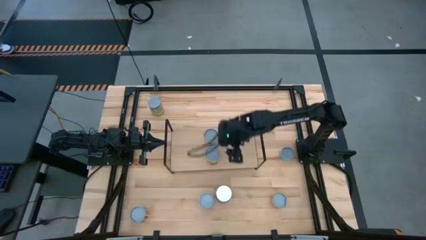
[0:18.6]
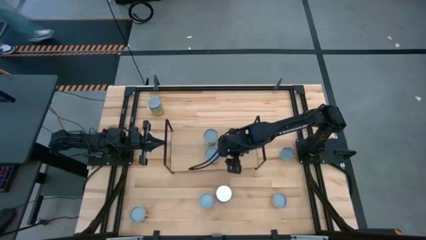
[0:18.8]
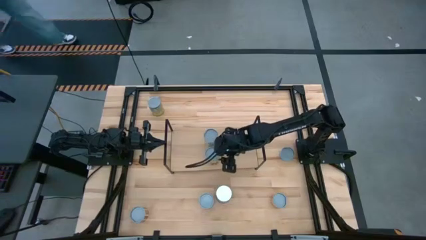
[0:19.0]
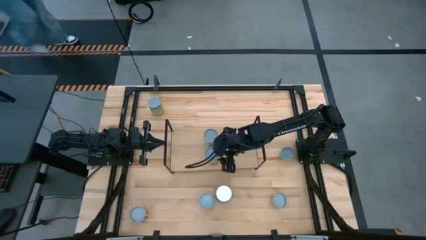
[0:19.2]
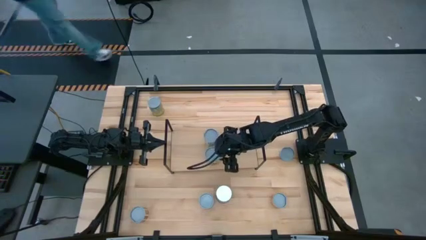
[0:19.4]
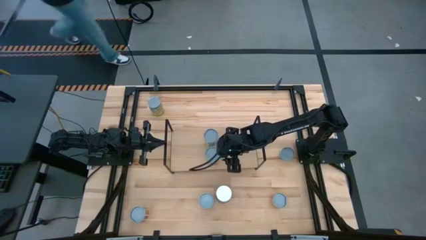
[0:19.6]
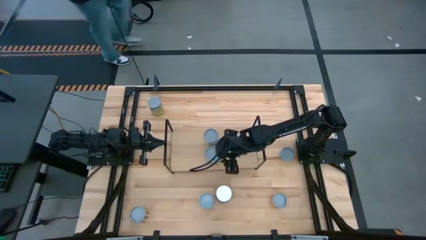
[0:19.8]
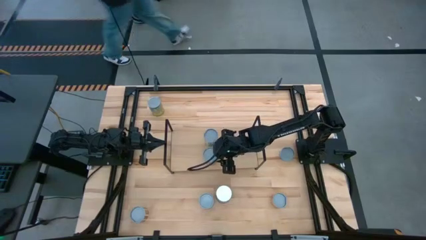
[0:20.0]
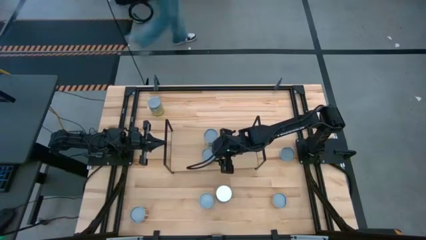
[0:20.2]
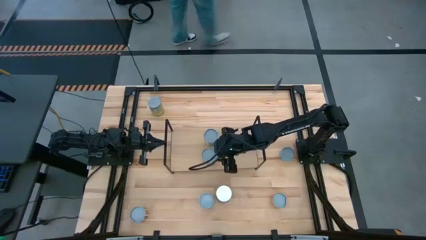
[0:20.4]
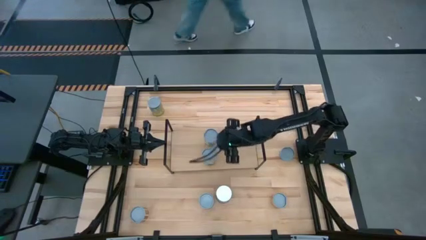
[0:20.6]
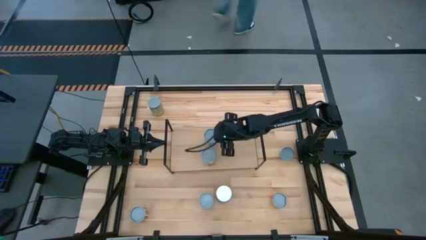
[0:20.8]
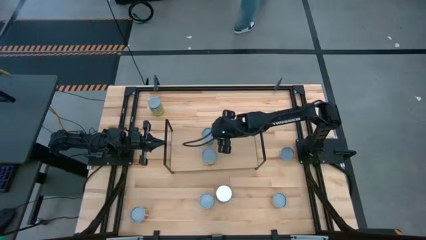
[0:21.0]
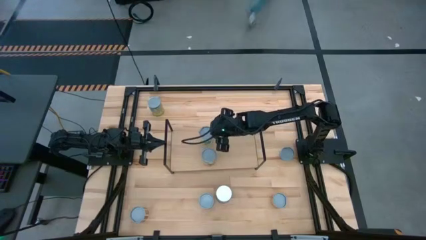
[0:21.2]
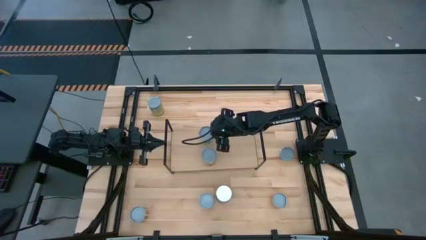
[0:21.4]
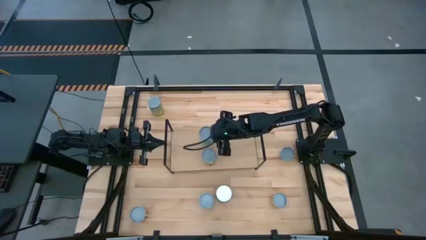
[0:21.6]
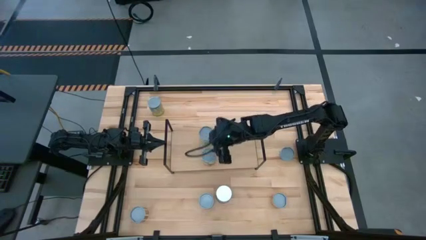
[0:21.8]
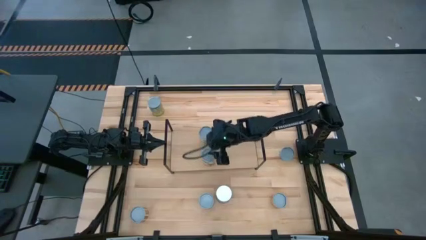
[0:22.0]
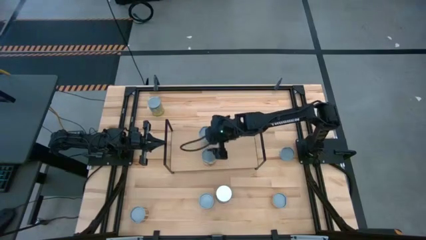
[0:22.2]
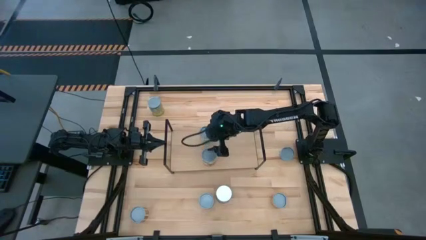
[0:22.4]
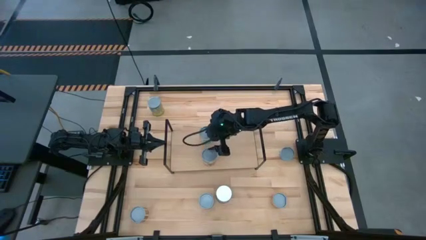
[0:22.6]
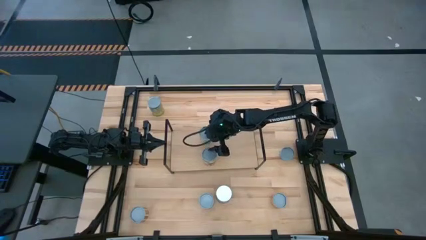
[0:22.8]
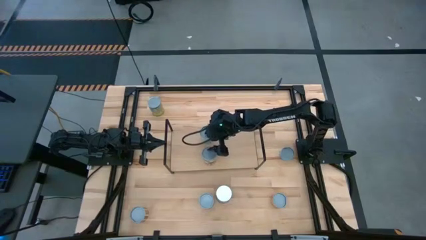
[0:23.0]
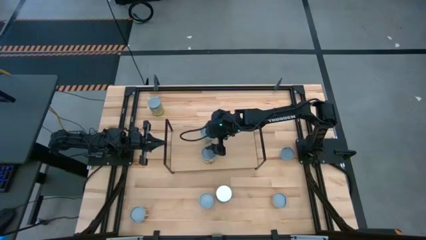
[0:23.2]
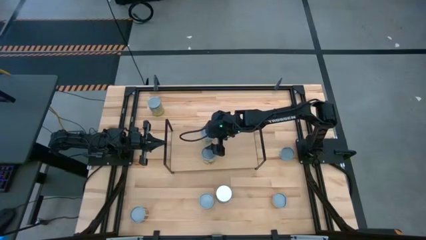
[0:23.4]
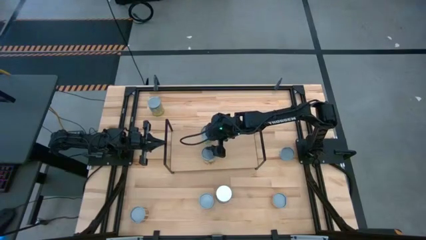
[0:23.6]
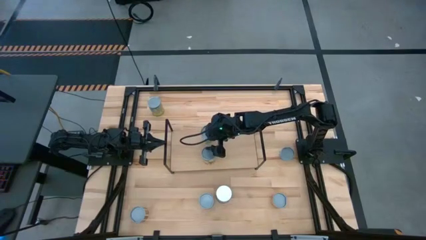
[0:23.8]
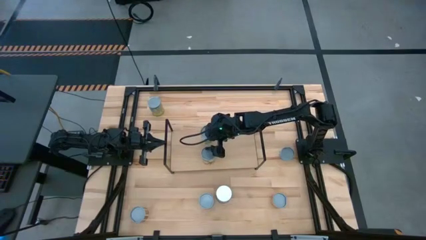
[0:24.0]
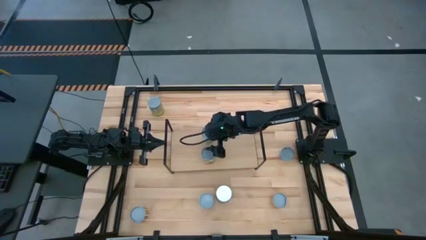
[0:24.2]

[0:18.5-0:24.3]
Task: Pick and place cans onto a shelf
Adjust the canned goods on the shelf

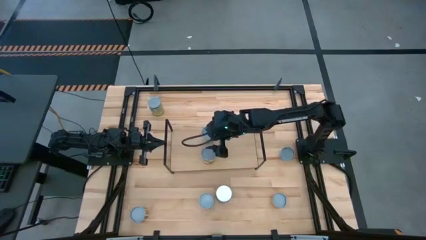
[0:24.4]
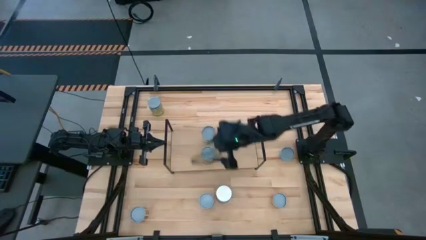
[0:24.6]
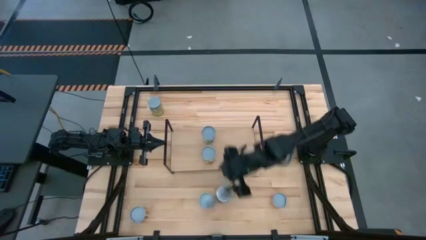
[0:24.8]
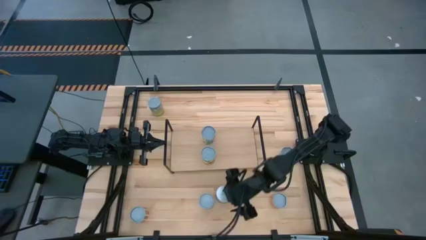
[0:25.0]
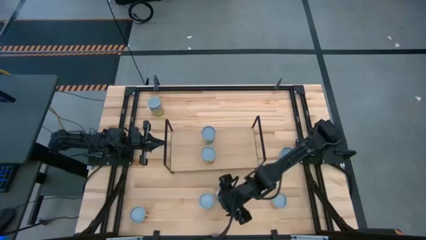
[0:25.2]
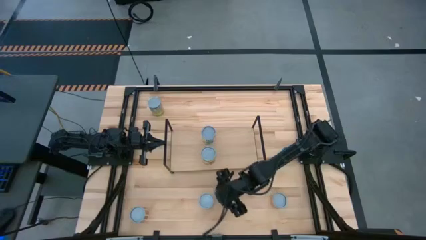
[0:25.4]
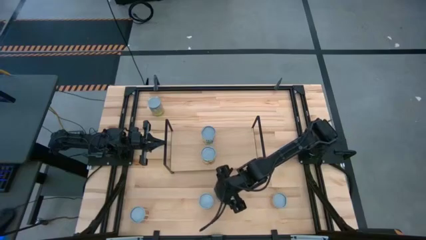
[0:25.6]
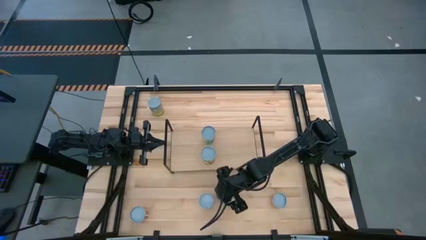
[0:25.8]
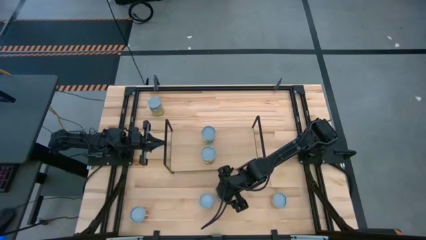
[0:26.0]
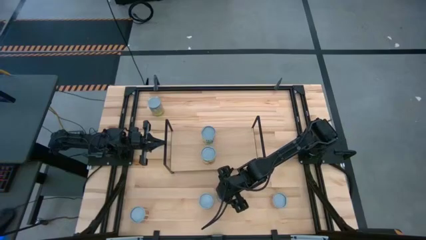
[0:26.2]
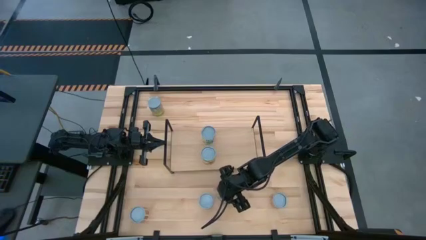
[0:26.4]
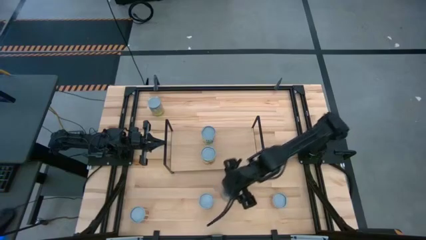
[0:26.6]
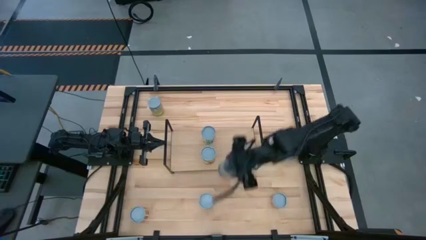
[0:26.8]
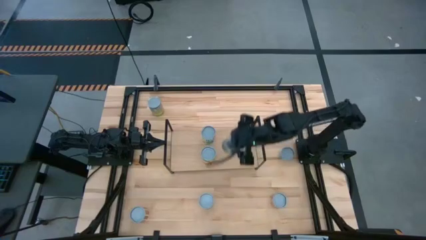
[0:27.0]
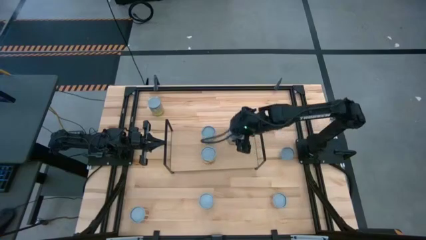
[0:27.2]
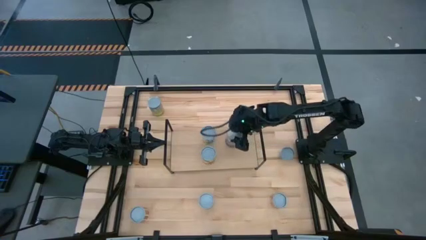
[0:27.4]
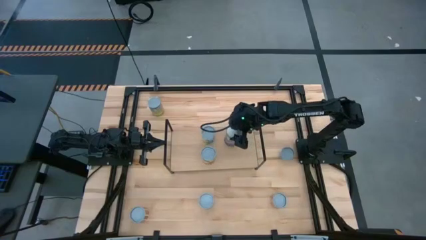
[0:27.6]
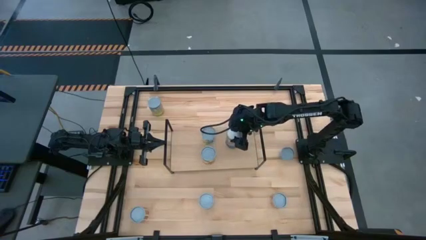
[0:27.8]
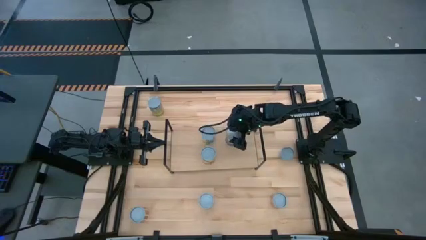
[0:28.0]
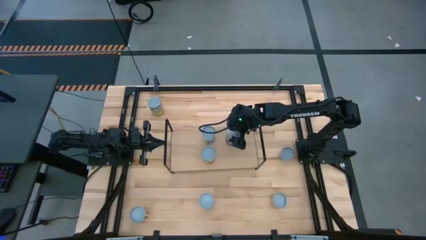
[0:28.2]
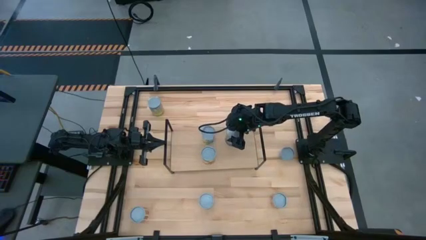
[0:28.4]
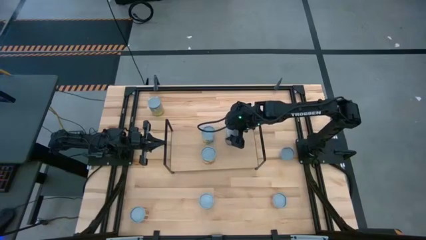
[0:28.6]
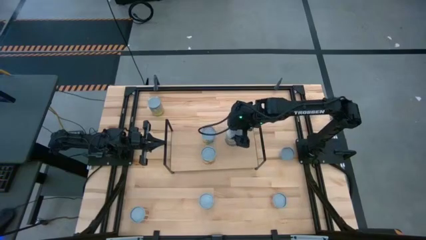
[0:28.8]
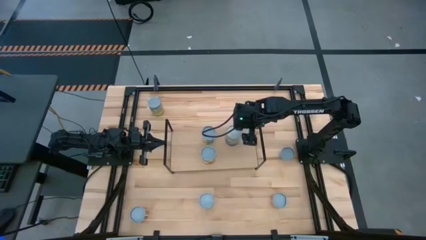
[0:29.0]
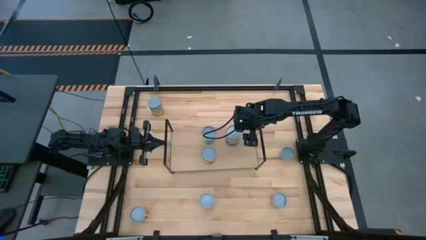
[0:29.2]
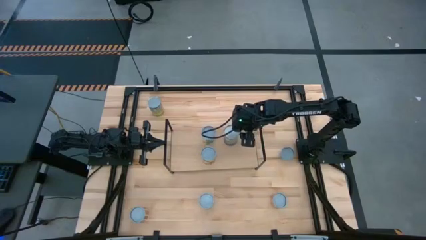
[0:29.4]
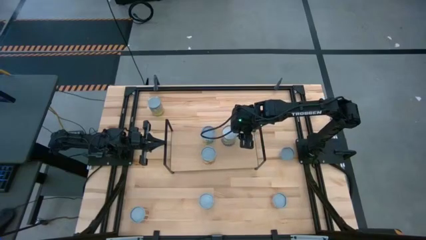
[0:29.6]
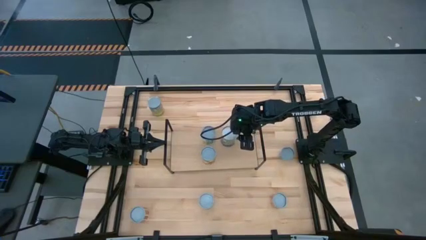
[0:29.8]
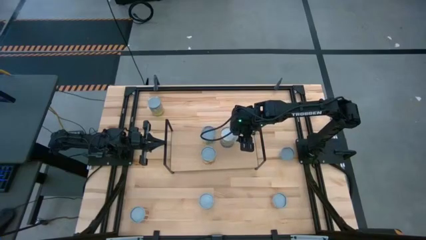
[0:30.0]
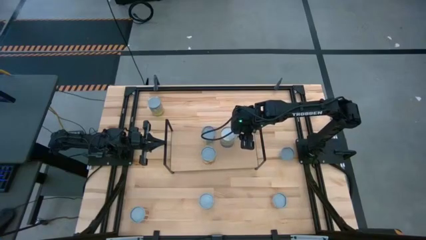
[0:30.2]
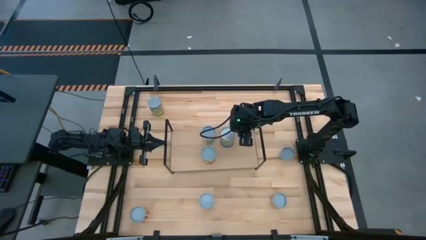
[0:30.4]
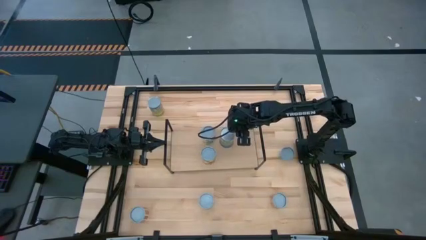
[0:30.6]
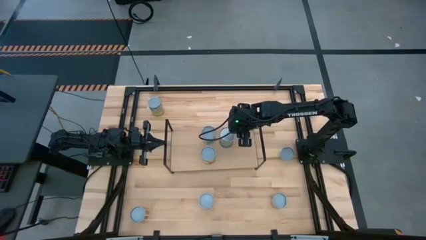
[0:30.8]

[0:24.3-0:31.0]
Put the canned peas on the shelf

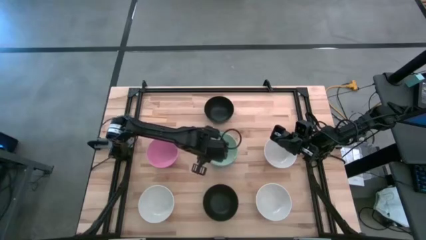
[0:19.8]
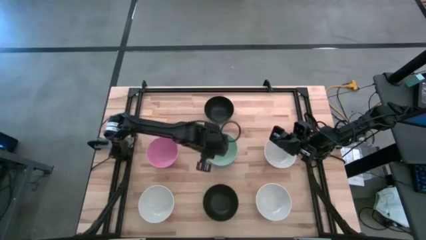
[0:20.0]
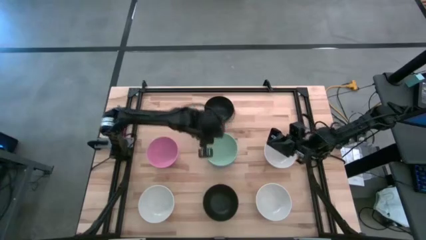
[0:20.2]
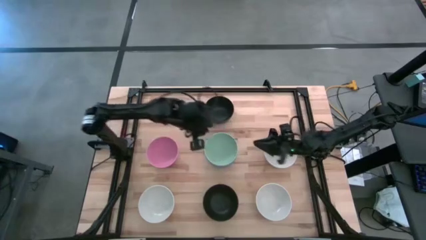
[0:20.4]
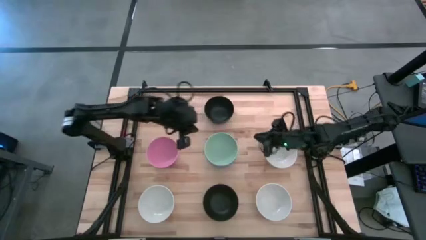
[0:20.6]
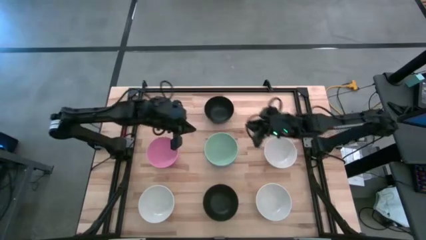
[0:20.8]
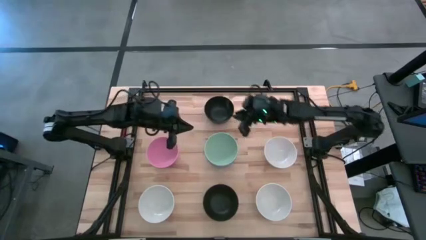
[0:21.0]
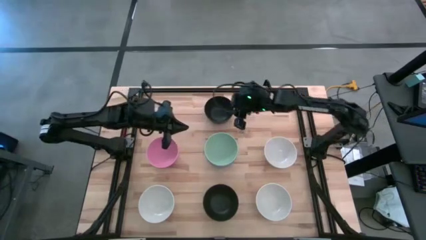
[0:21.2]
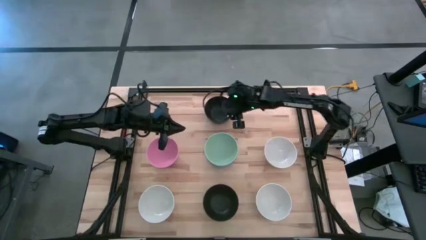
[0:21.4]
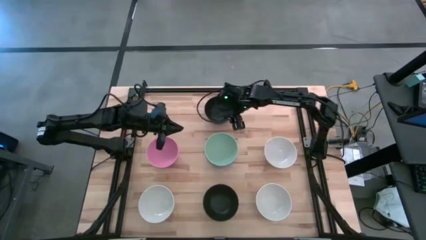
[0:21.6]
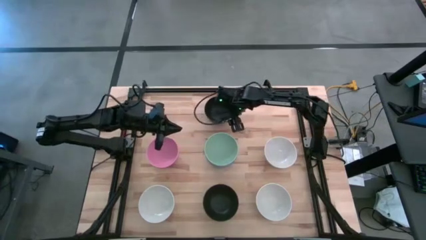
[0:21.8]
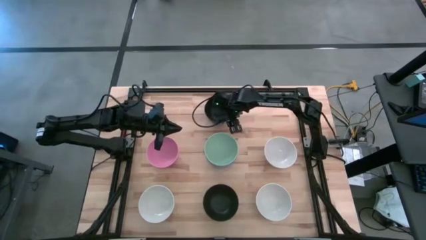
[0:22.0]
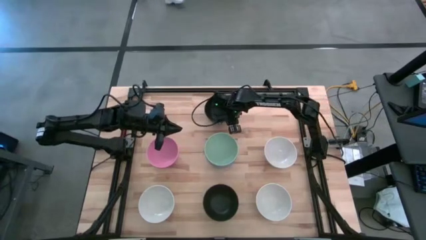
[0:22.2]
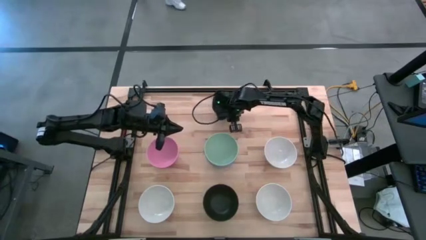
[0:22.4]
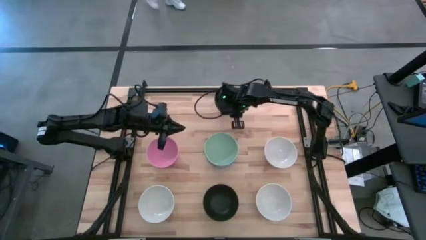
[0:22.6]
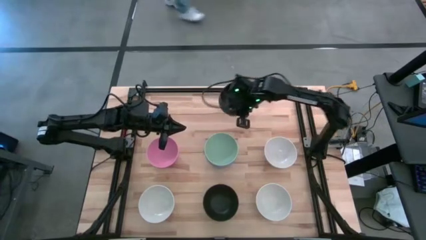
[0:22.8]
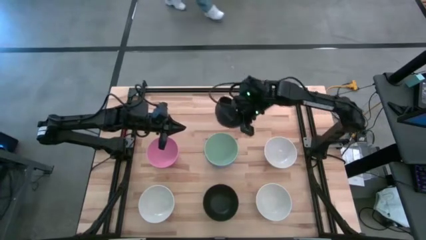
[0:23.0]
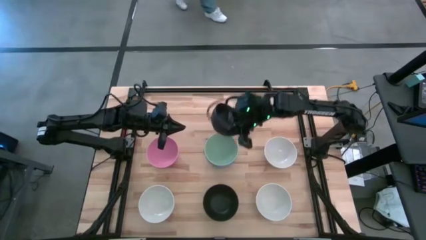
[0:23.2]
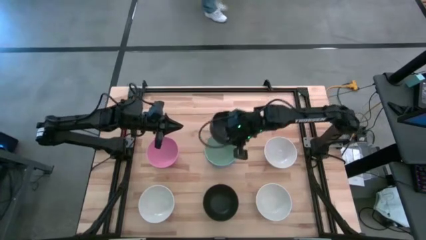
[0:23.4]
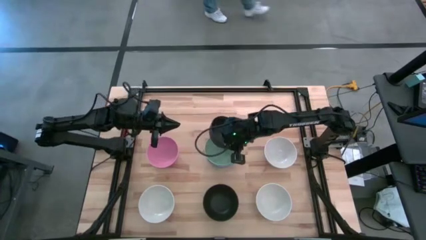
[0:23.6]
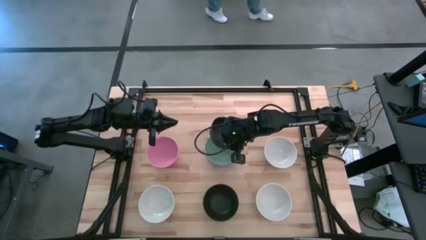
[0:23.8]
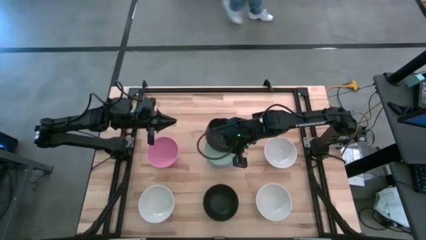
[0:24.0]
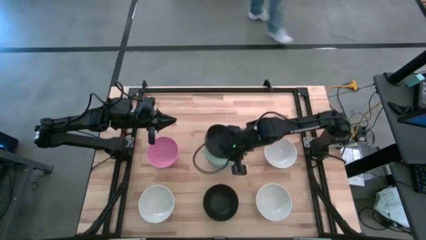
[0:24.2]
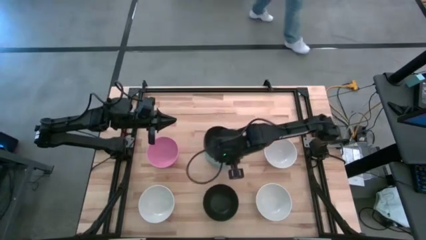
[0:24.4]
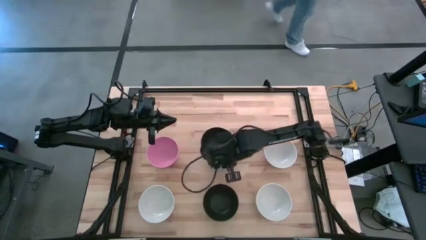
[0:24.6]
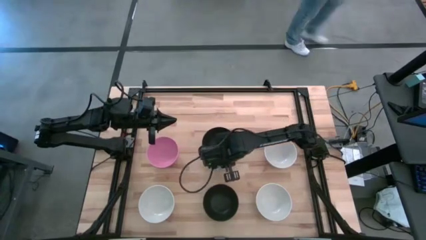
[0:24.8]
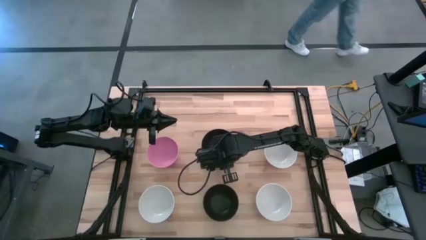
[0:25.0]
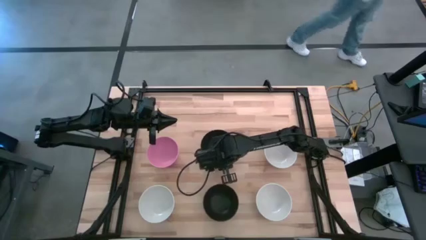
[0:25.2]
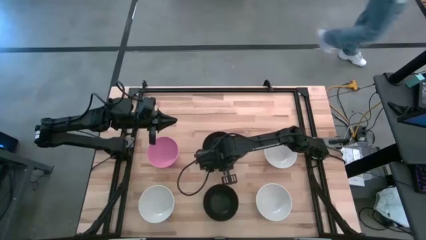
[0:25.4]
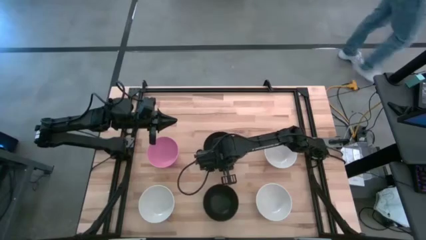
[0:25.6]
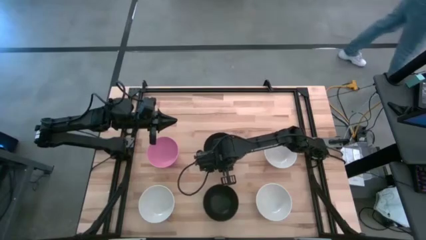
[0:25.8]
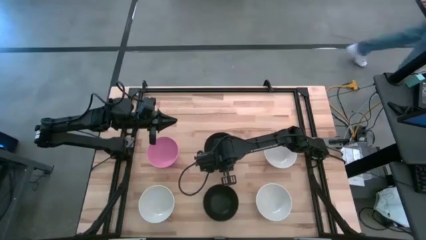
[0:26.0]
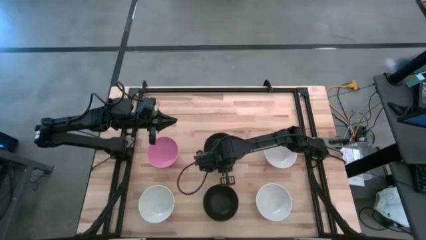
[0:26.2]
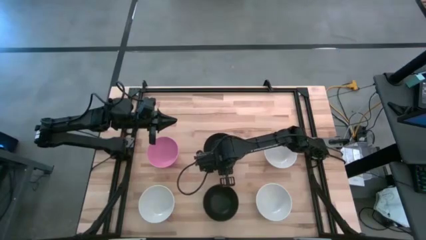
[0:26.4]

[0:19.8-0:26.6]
Task: Nest bowls inside each other
Stack the top black bowl on top of the green bowl
